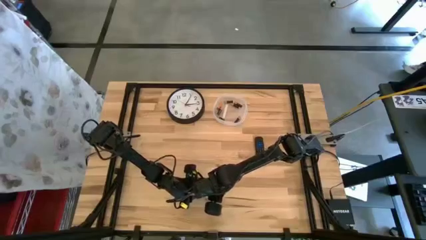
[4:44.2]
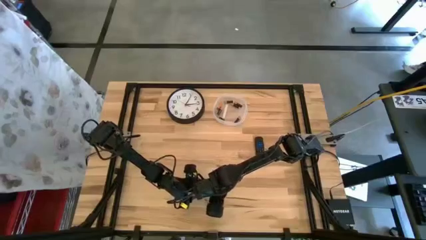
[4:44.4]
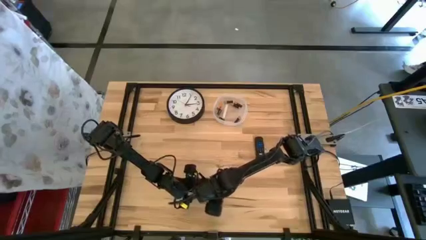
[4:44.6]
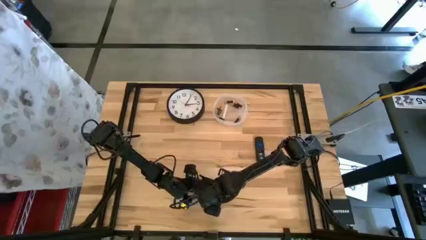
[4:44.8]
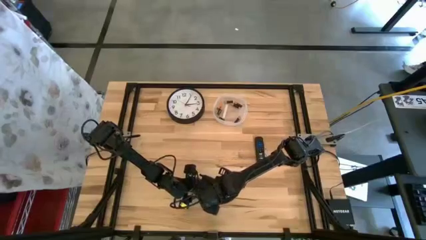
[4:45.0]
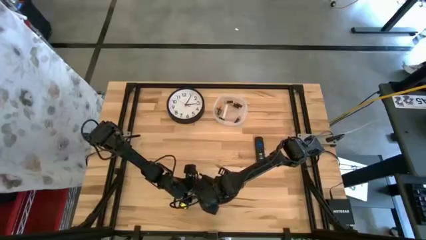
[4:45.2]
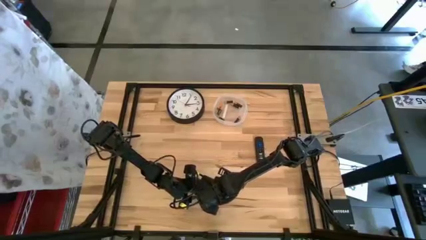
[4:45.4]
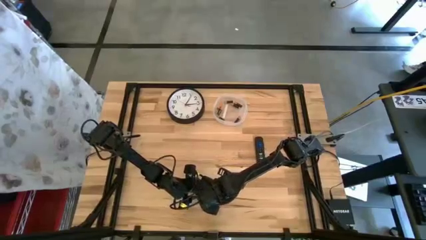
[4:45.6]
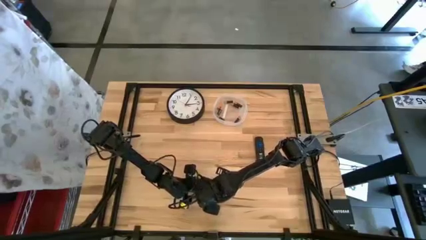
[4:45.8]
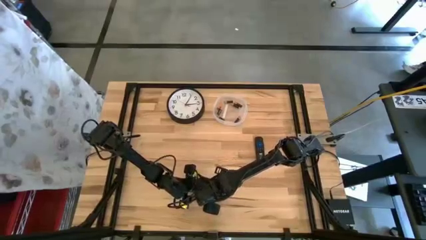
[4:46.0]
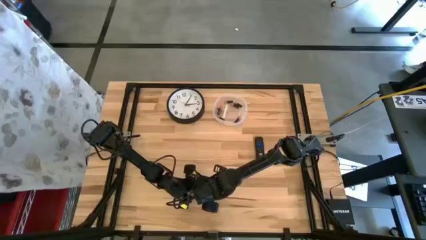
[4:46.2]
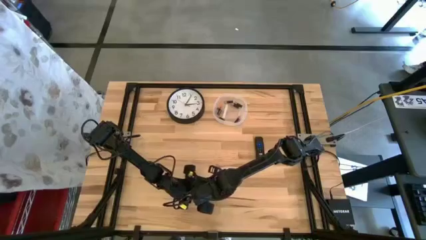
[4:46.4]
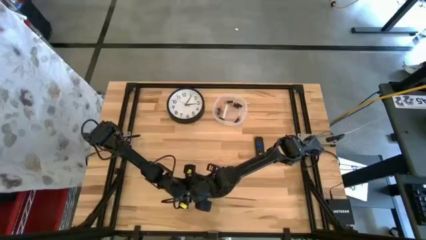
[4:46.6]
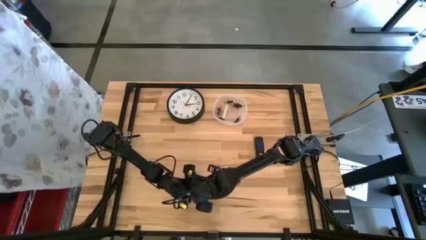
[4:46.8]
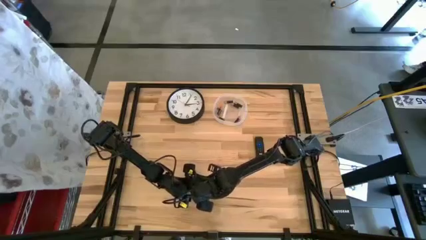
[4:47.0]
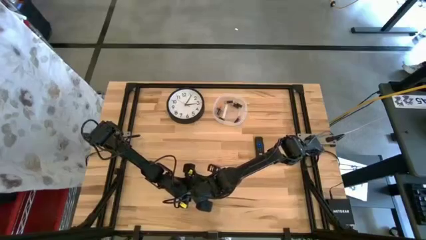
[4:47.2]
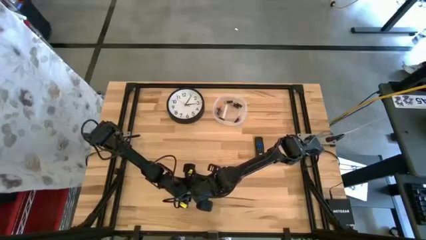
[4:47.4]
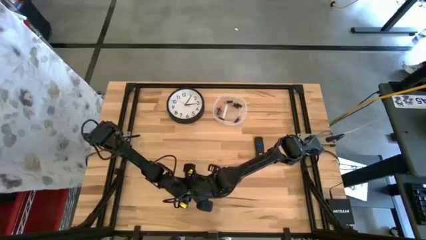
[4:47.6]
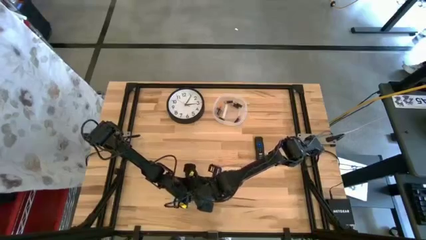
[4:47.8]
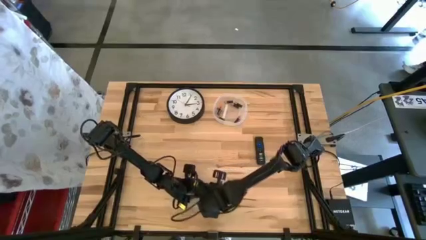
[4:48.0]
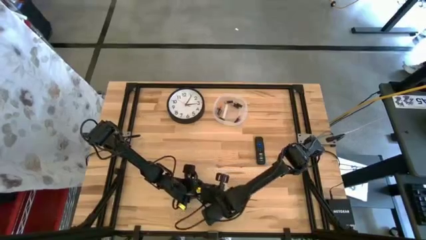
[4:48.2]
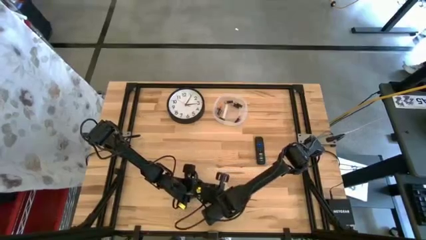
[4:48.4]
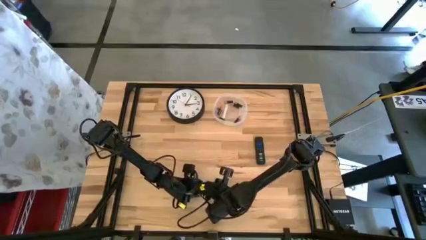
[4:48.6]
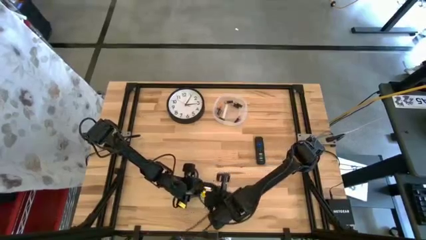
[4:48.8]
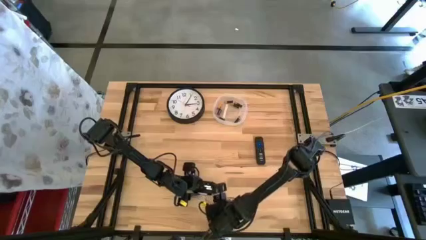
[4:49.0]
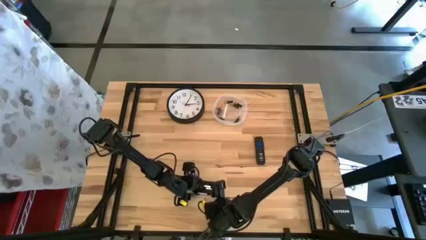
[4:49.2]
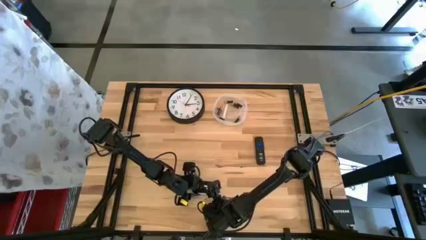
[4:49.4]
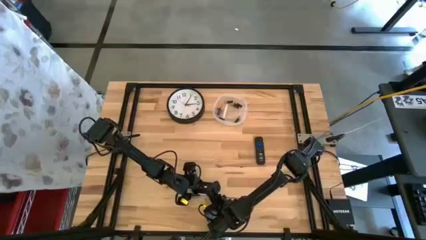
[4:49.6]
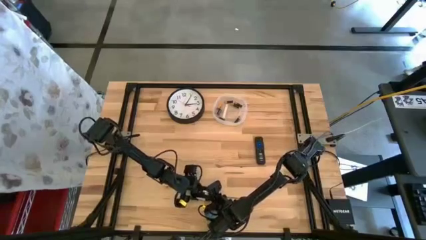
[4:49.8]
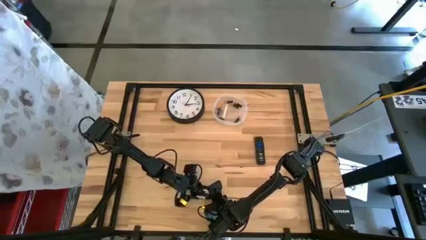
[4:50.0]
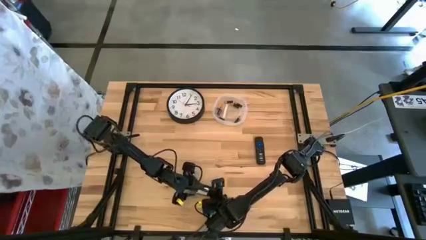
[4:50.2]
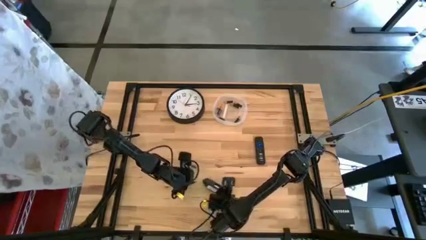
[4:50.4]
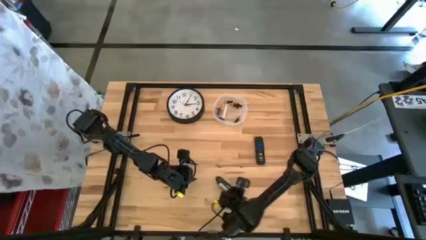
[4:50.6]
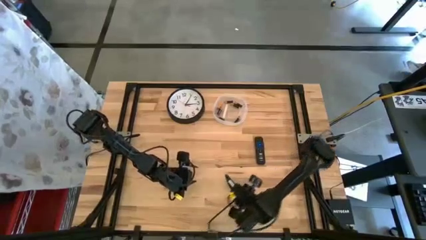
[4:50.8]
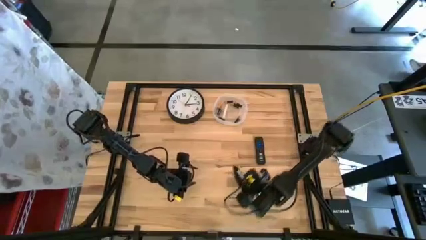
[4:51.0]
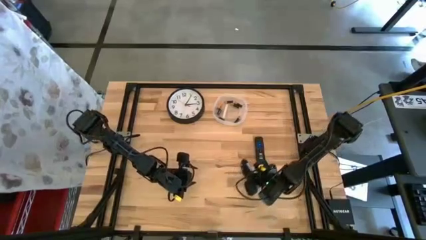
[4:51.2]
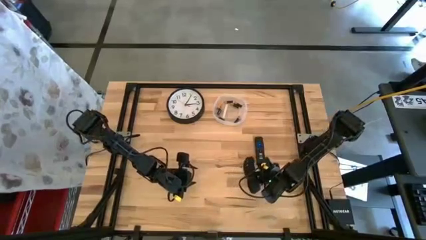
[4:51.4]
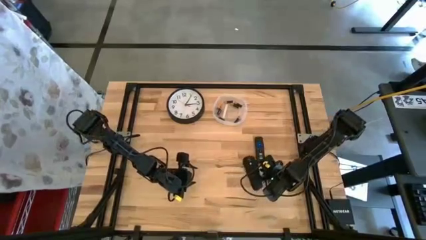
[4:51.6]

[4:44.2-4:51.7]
Task: Insert battery
Insert the silver battery into the computer mouse

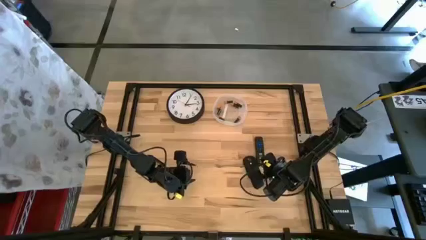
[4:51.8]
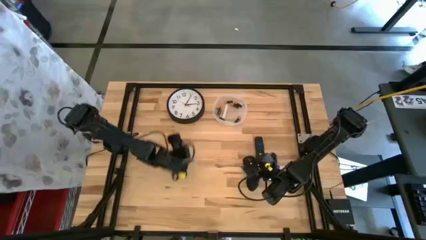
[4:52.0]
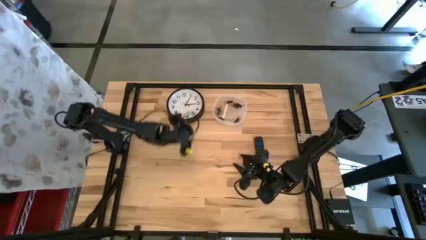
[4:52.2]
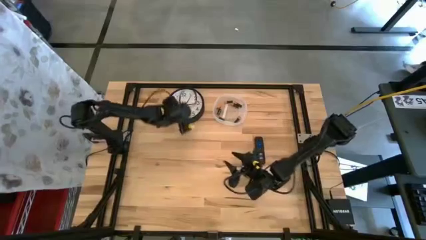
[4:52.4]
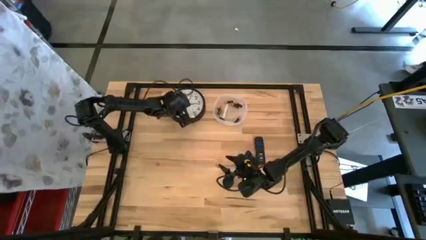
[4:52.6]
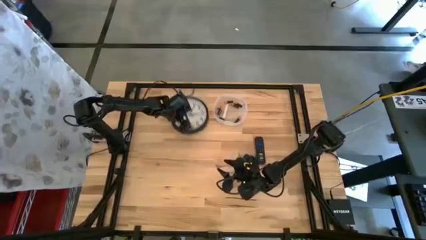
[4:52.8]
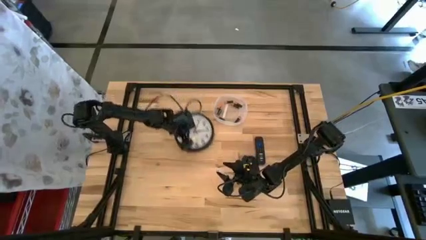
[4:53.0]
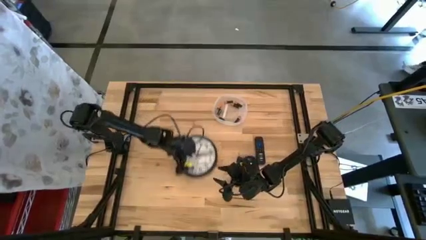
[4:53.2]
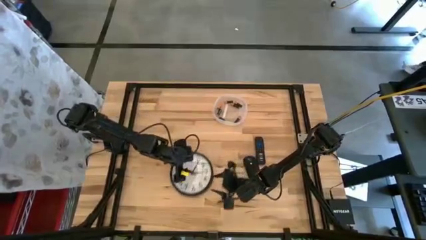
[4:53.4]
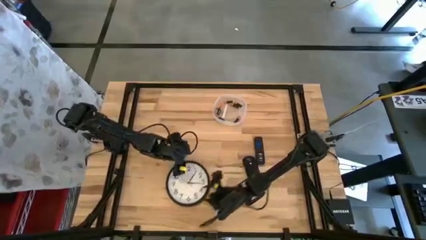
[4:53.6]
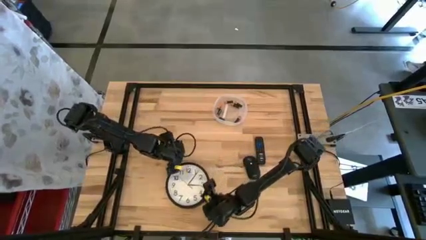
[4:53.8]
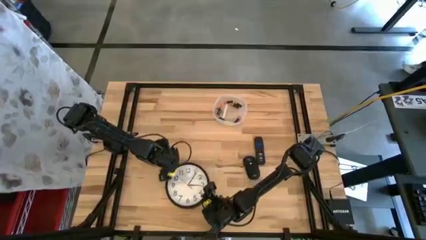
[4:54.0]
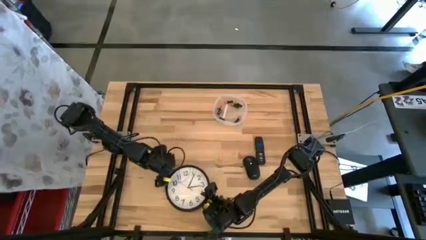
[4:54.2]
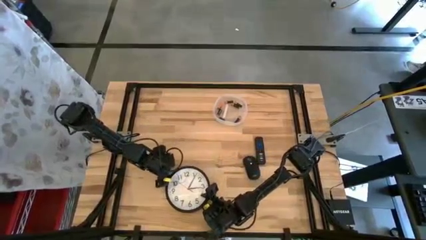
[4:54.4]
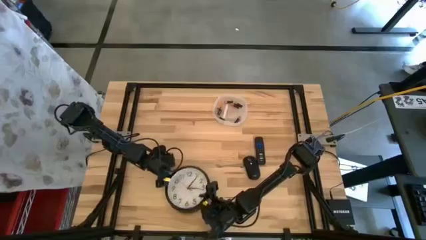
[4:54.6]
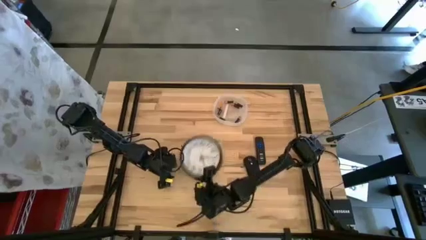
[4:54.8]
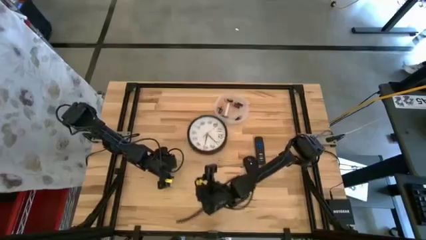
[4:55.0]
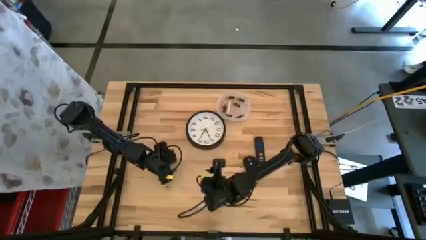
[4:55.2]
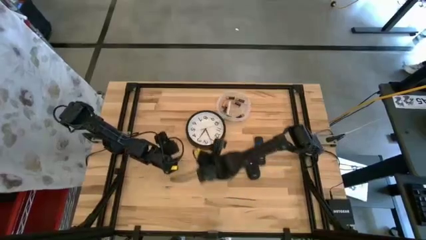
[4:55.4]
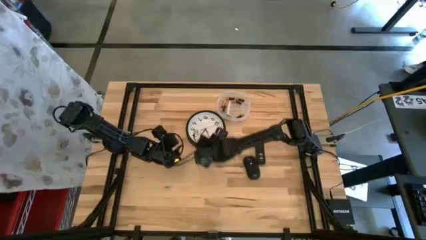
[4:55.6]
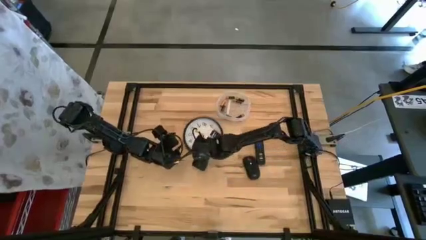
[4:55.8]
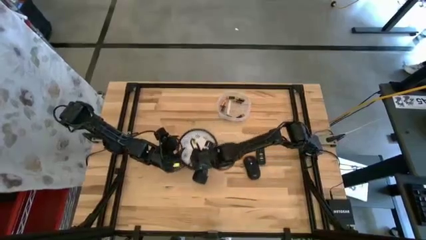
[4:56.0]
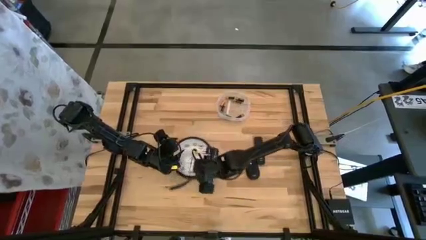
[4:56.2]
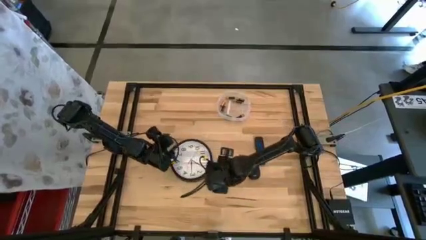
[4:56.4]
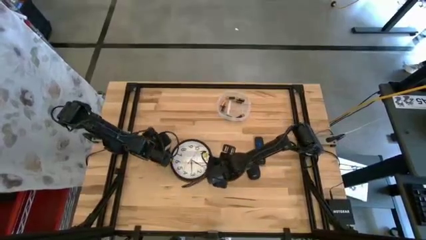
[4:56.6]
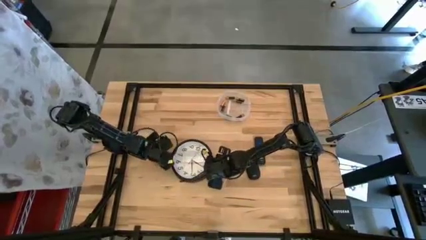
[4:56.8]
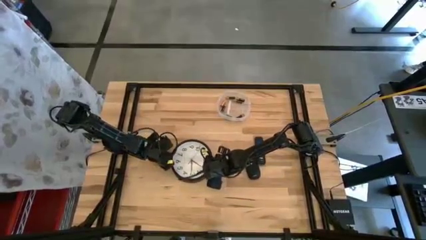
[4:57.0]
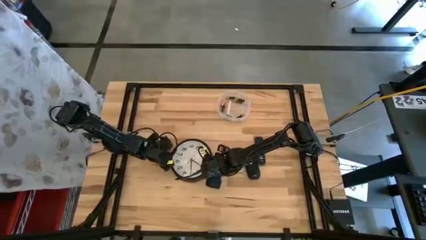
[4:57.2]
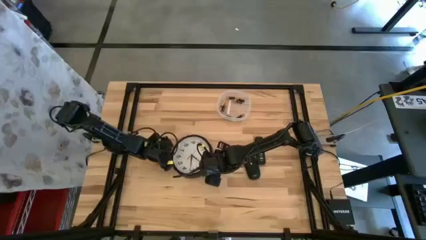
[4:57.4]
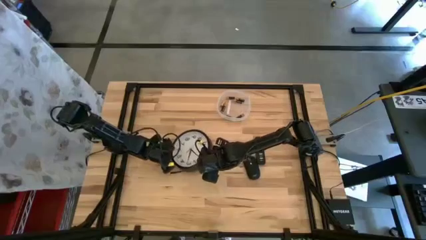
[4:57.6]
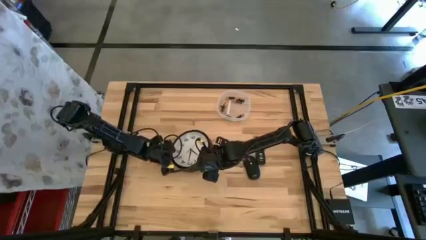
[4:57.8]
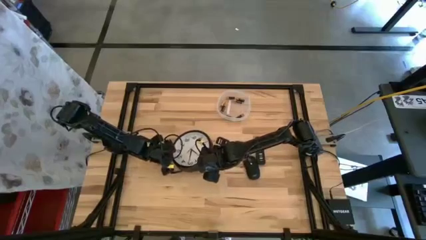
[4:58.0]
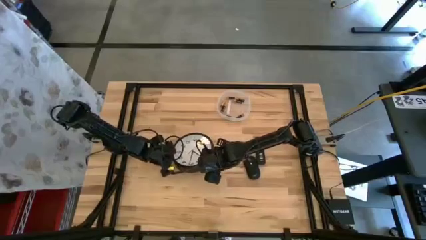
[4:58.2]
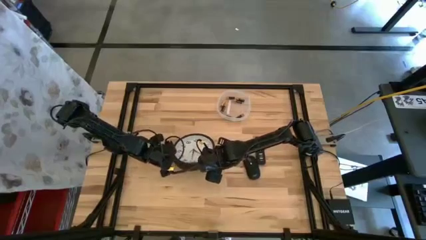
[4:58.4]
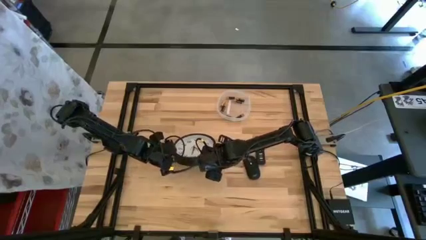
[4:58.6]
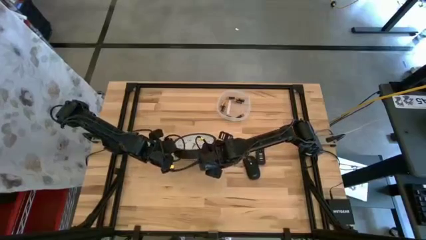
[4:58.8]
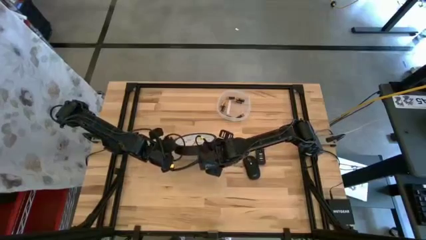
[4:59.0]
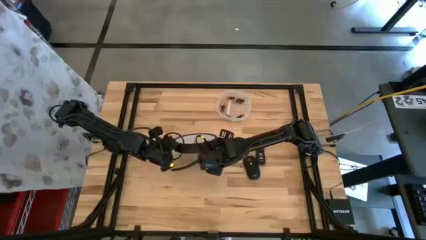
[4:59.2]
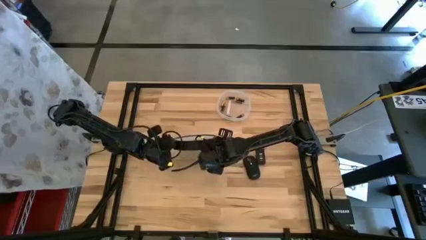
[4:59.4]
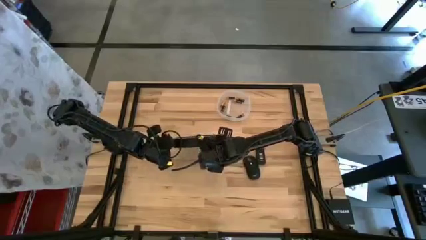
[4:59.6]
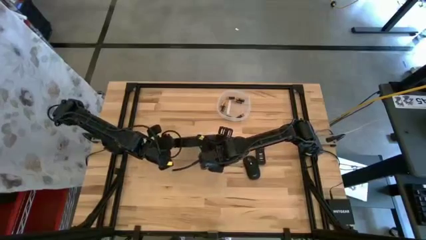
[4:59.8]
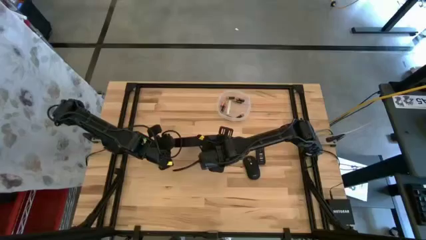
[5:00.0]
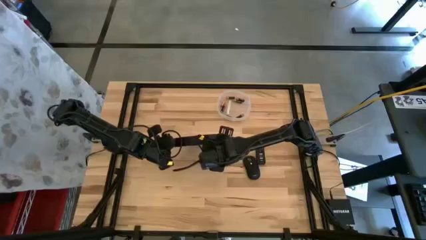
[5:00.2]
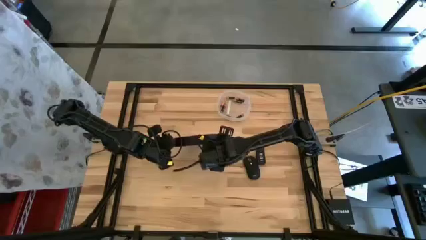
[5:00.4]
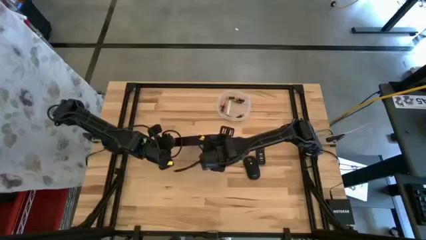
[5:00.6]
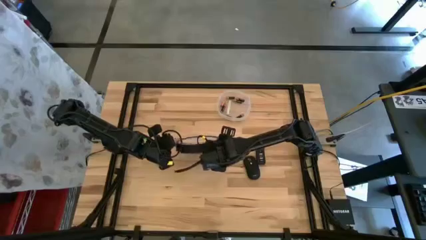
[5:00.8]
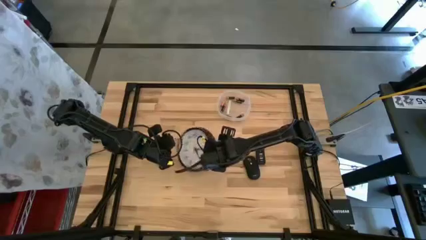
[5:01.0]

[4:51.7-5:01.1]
Prepare the wall clock
